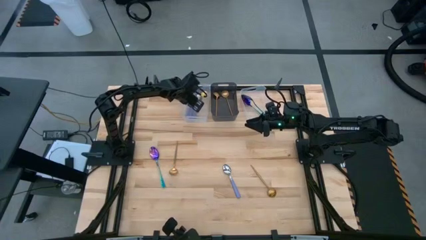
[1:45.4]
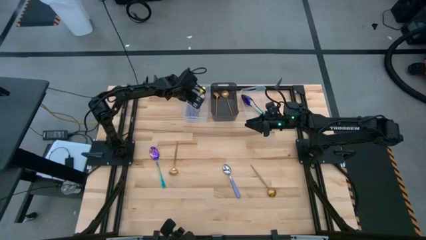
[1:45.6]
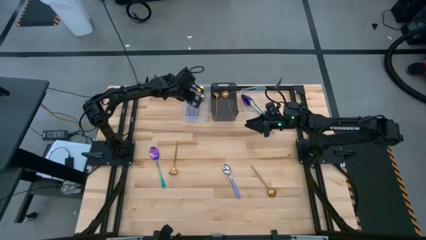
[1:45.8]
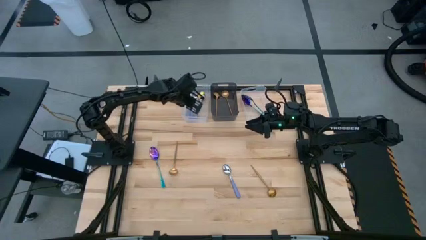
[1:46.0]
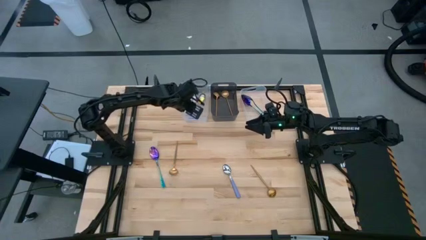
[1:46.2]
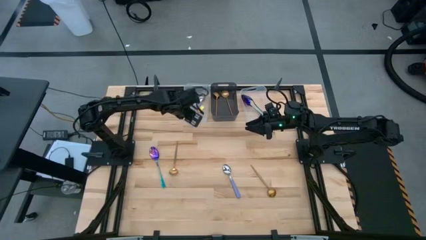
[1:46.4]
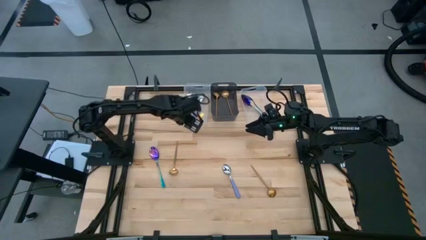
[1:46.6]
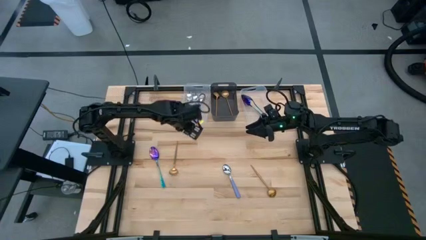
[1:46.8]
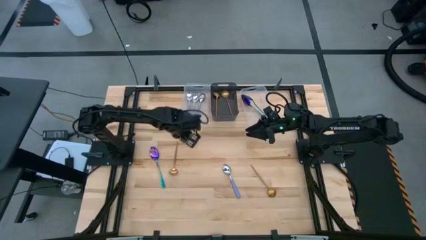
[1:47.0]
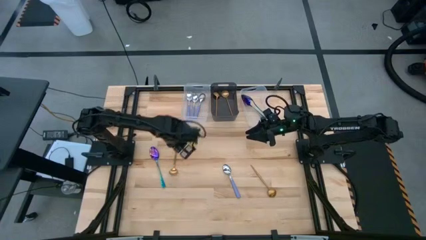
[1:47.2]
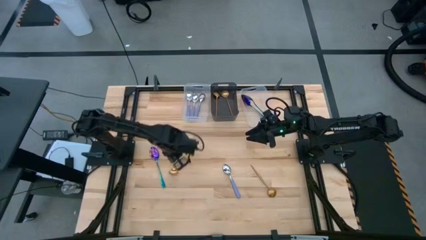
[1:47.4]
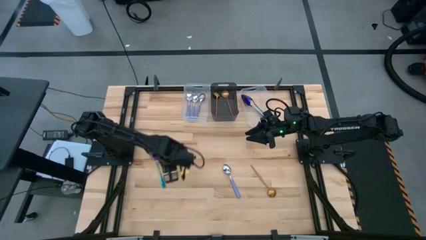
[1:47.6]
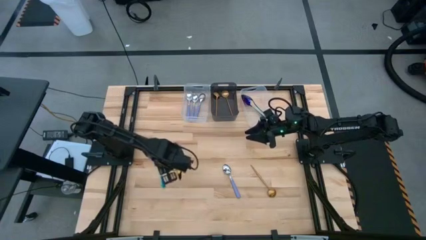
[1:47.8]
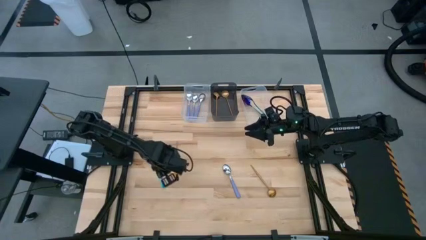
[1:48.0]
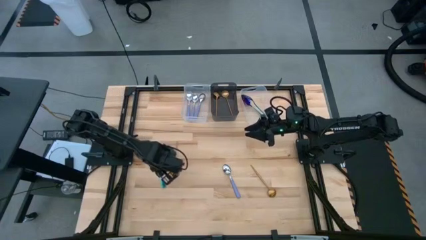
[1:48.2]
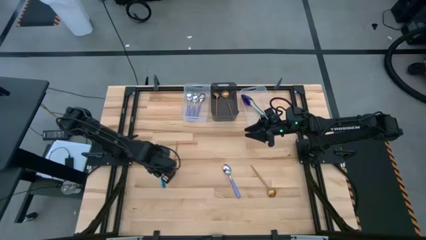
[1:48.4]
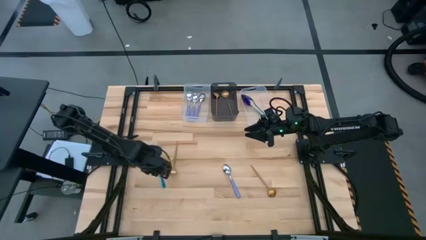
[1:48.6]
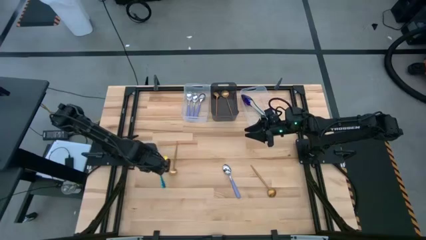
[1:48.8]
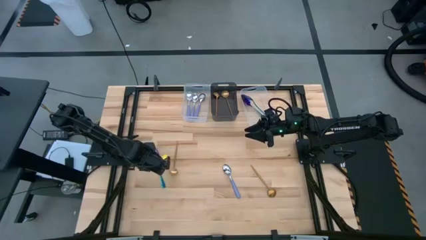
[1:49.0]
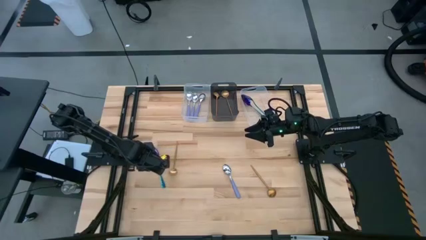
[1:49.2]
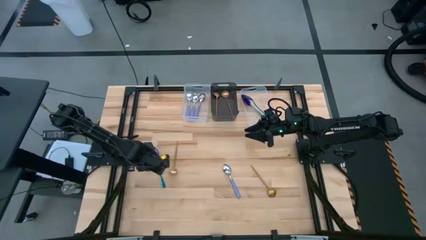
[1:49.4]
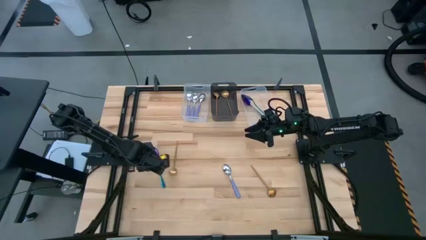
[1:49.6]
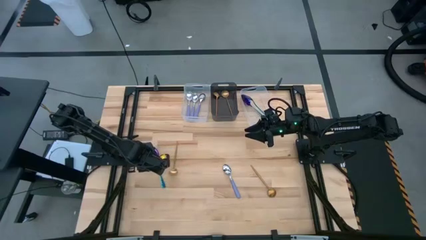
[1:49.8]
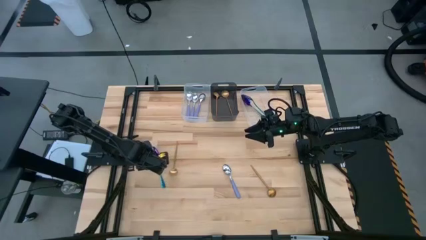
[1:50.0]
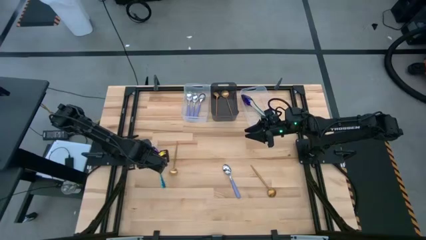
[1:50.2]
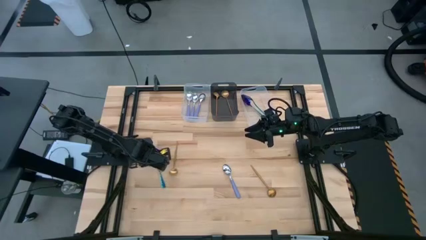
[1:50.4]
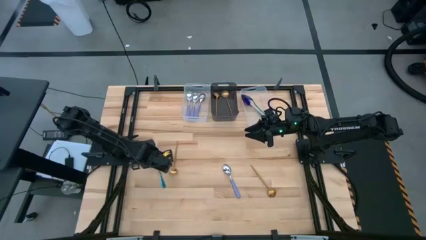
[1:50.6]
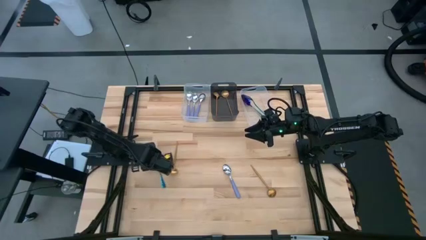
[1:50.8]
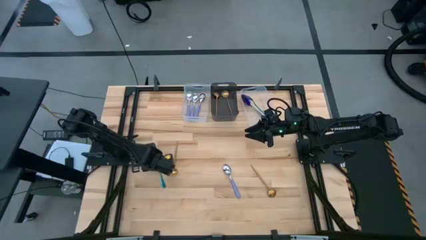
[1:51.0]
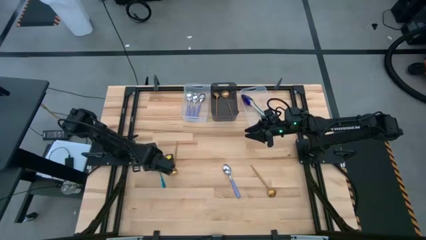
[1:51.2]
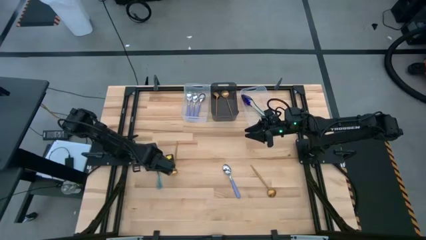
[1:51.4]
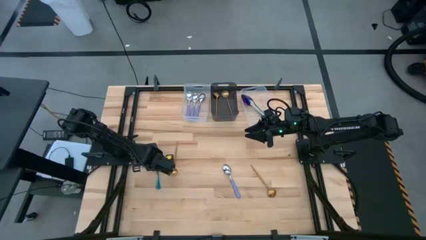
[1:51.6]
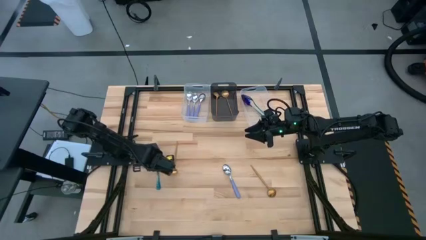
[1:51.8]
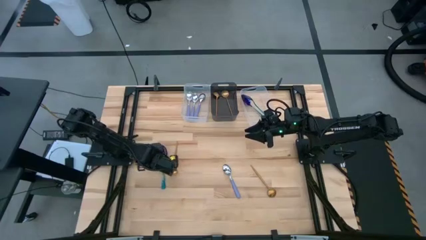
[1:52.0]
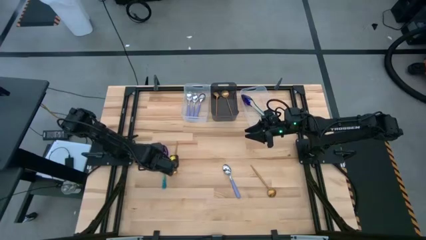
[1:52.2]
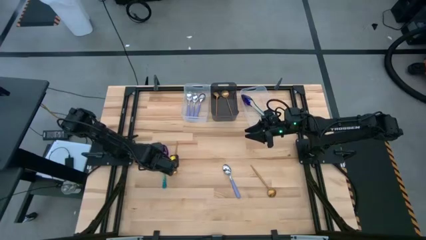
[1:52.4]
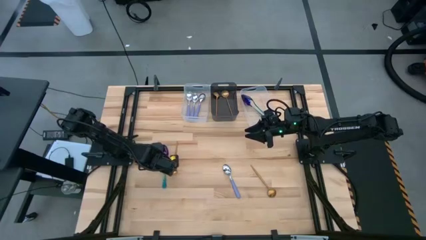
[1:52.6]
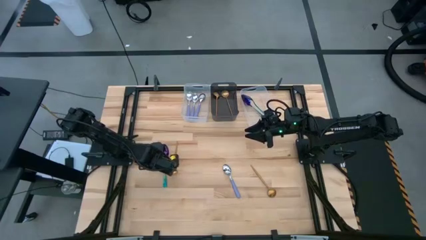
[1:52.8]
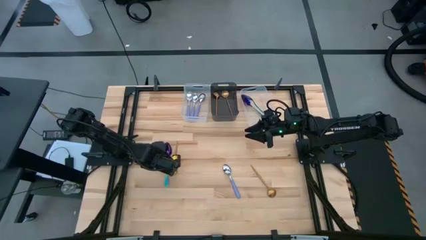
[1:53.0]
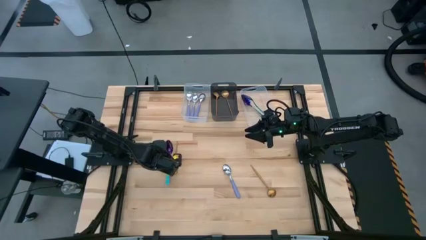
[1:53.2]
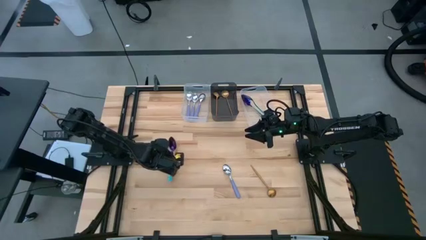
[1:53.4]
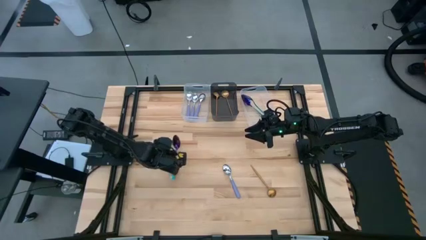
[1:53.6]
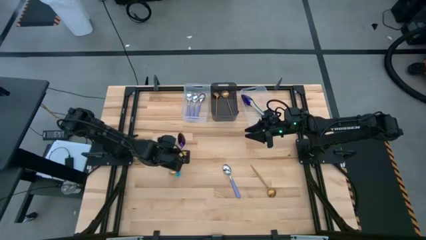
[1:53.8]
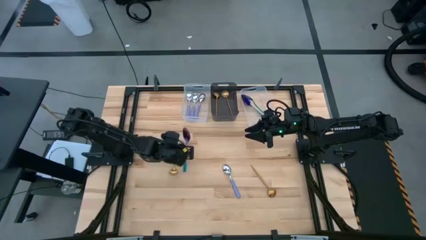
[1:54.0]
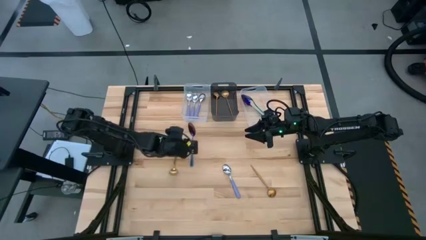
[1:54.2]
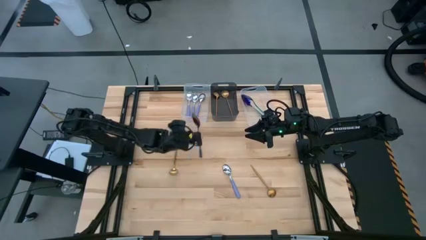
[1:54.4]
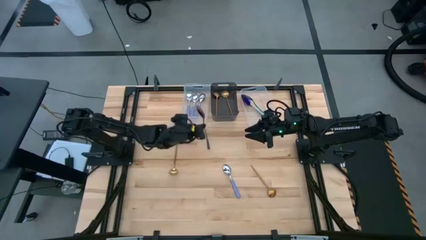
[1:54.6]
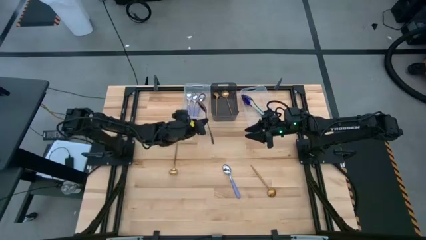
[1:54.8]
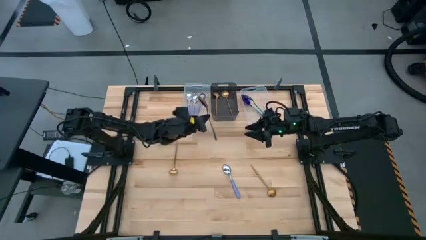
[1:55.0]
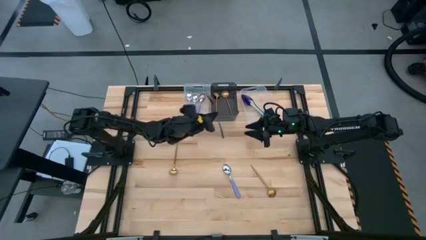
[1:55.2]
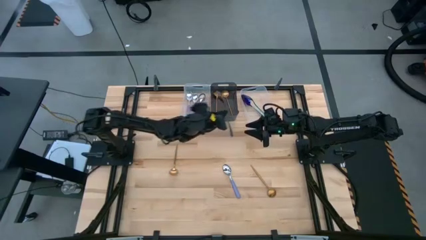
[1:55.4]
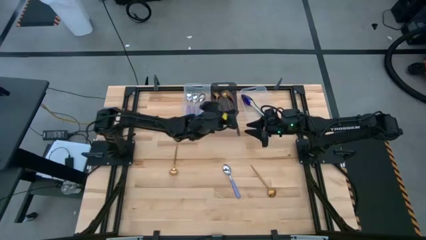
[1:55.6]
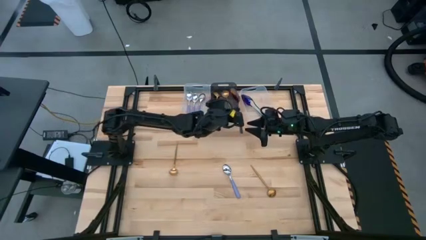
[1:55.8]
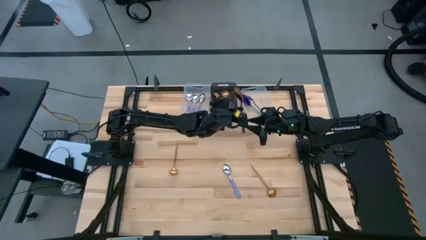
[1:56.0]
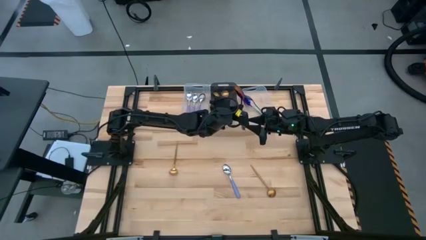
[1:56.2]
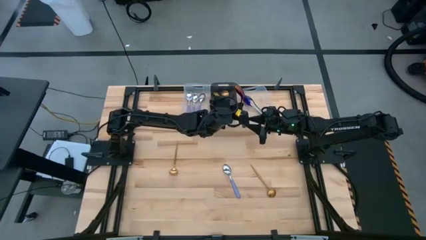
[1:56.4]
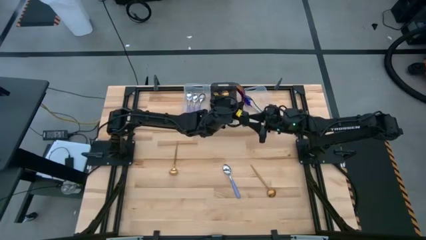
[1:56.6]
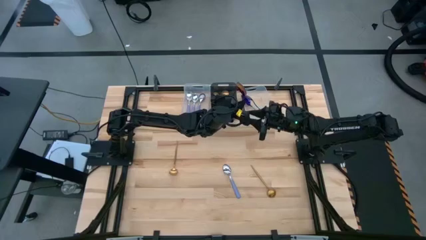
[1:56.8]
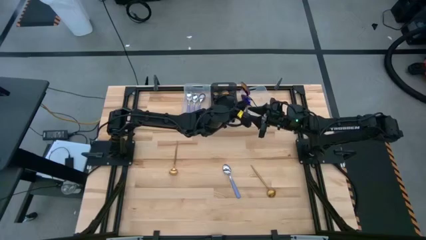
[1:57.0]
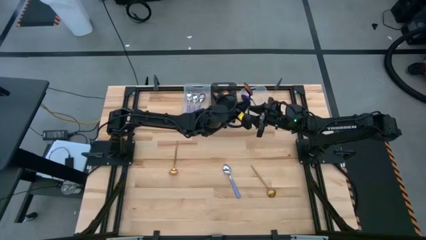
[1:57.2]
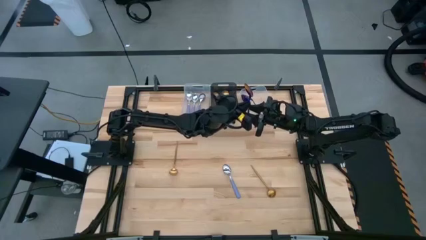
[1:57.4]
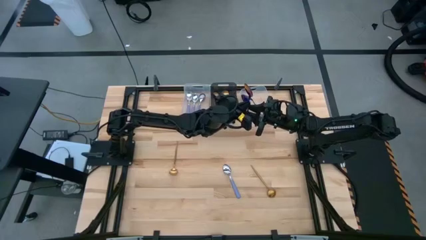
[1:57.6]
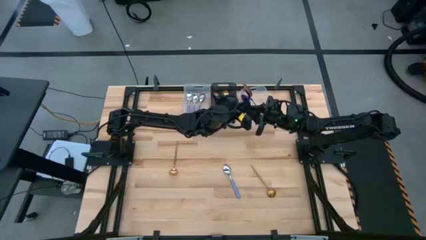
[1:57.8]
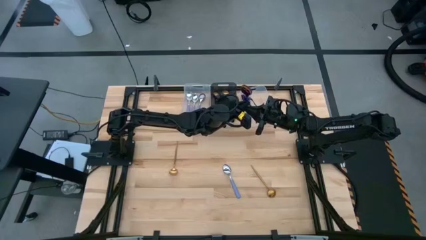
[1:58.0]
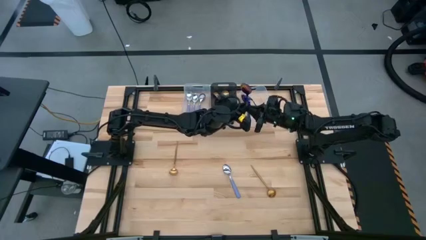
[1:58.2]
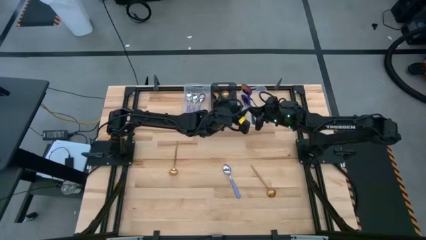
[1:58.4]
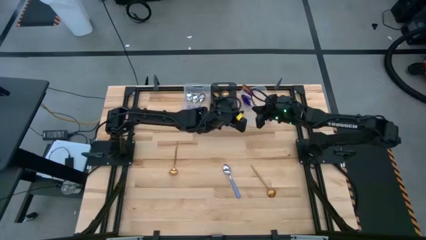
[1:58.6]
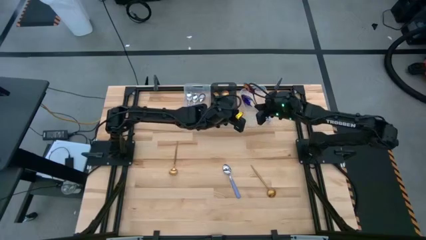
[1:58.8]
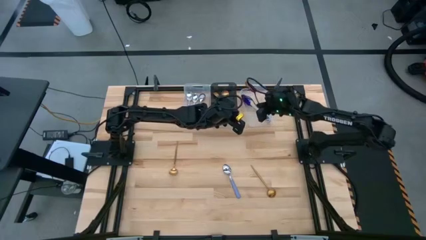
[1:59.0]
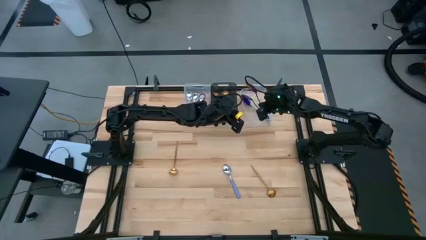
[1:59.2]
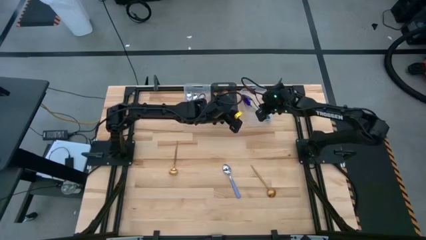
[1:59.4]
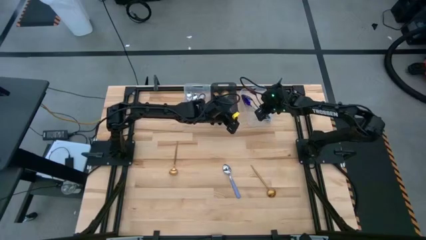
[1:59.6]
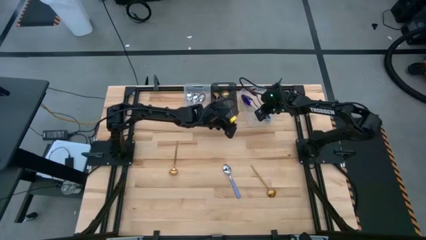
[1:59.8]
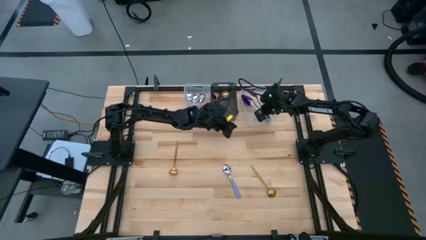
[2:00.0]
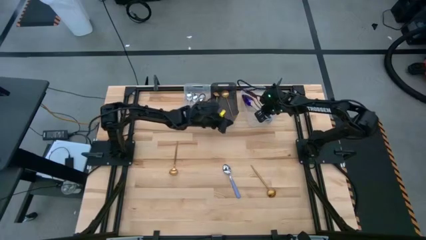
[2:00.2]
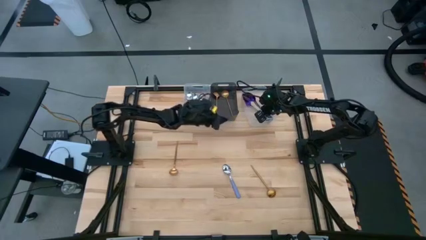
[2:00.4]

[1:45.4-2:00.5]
Task: Sort silverware by color (type)
Put the blue spoon into the right transparent bin
